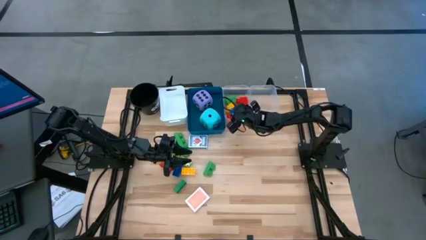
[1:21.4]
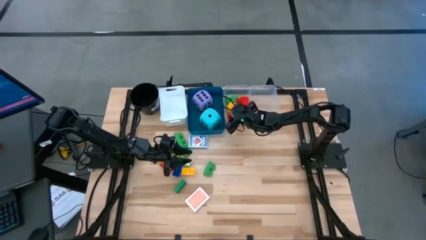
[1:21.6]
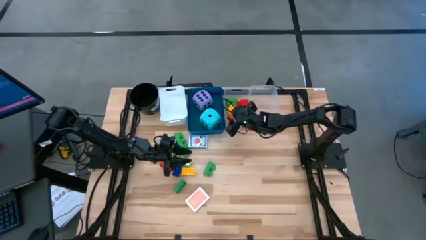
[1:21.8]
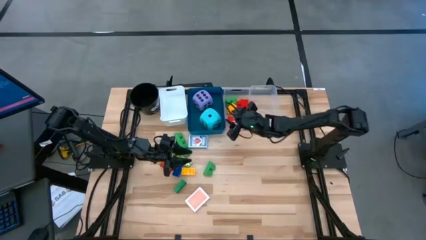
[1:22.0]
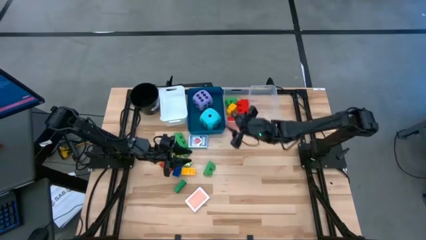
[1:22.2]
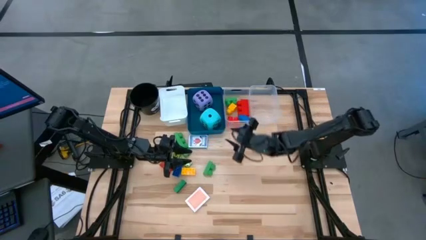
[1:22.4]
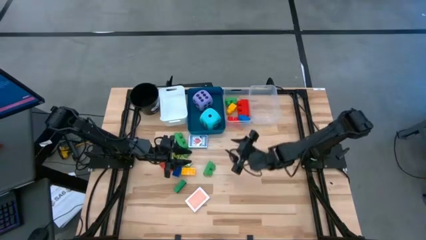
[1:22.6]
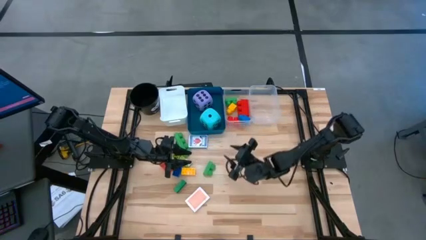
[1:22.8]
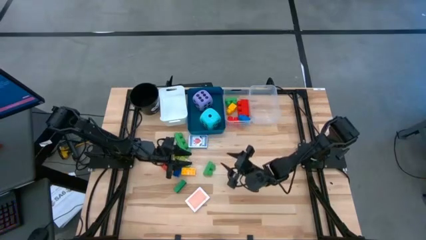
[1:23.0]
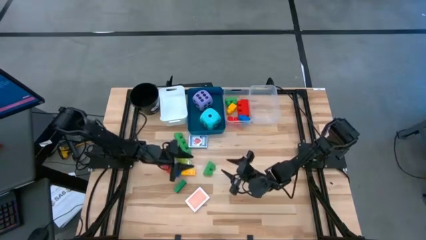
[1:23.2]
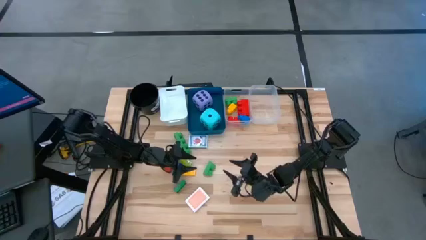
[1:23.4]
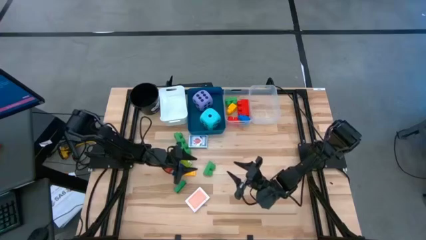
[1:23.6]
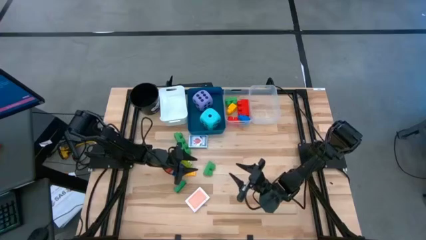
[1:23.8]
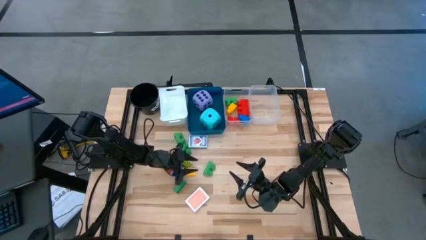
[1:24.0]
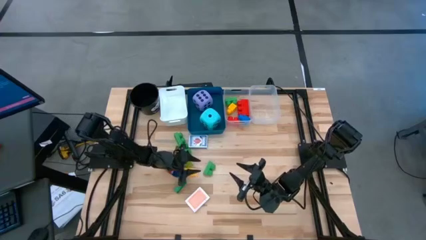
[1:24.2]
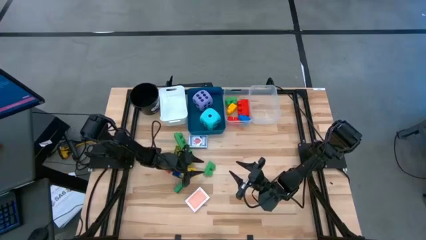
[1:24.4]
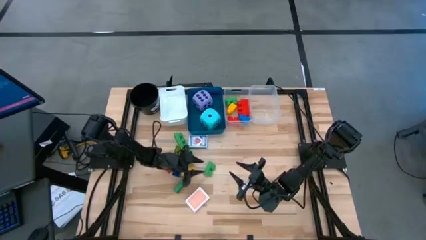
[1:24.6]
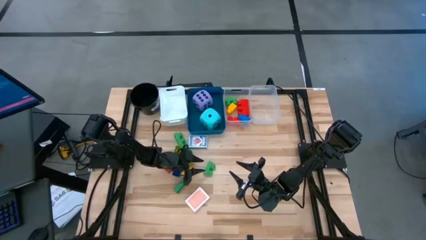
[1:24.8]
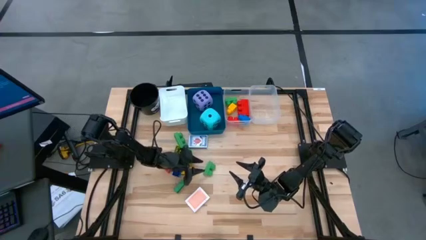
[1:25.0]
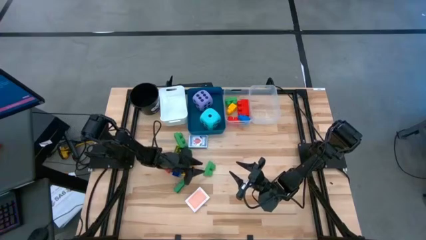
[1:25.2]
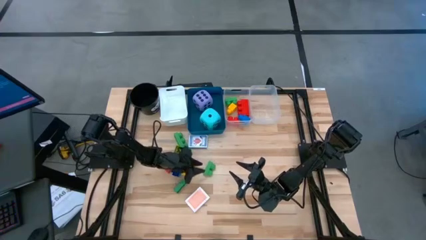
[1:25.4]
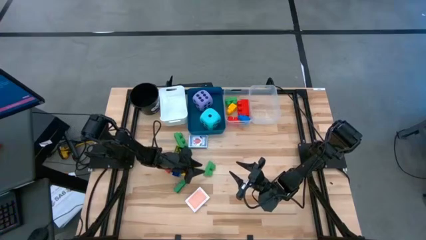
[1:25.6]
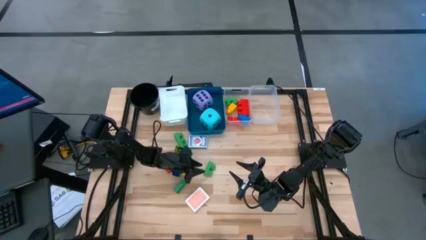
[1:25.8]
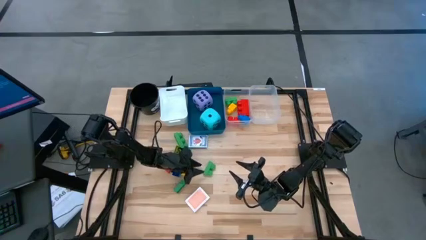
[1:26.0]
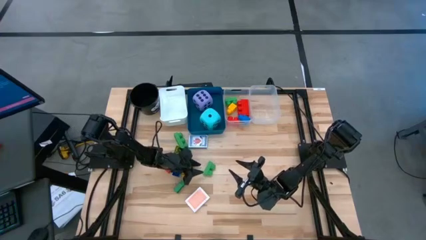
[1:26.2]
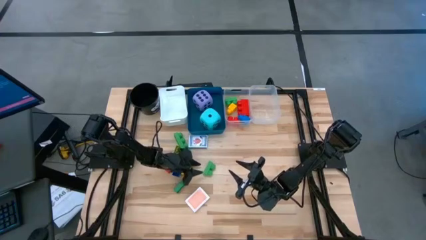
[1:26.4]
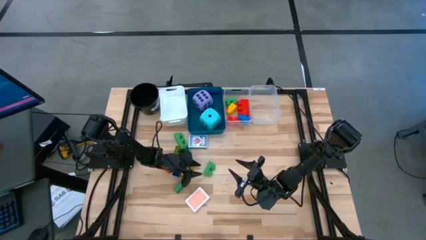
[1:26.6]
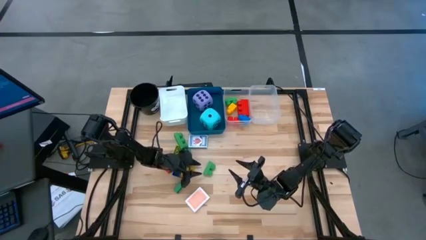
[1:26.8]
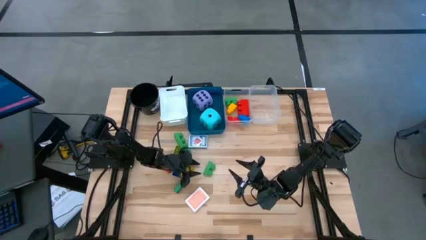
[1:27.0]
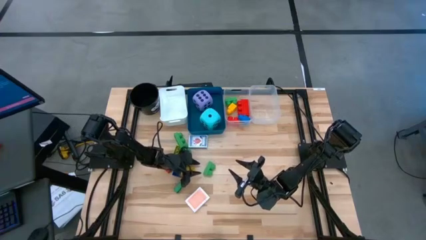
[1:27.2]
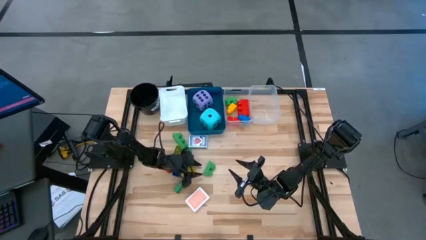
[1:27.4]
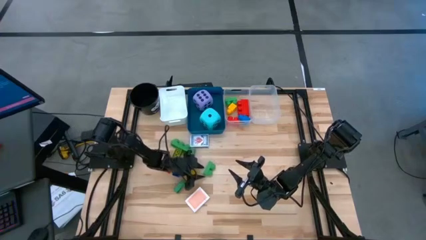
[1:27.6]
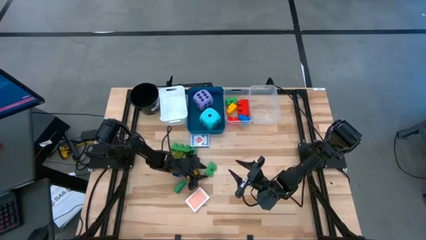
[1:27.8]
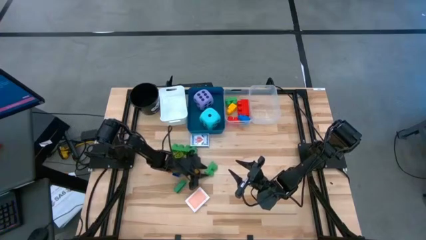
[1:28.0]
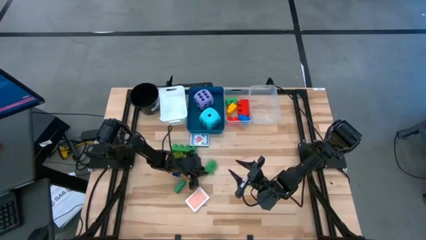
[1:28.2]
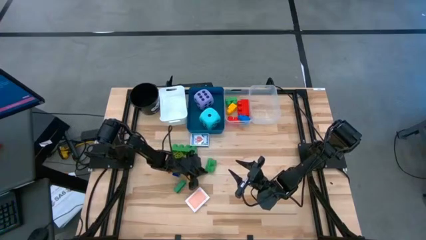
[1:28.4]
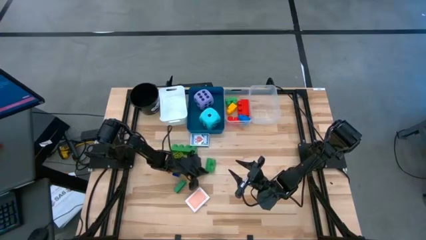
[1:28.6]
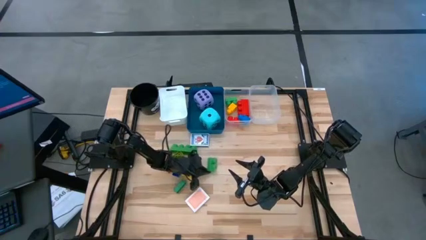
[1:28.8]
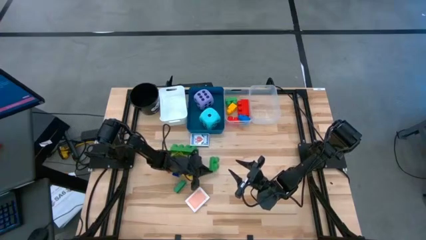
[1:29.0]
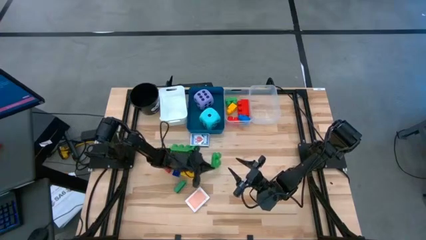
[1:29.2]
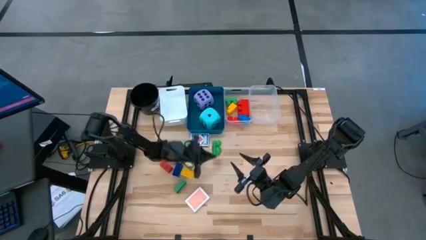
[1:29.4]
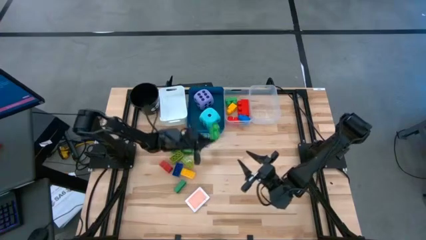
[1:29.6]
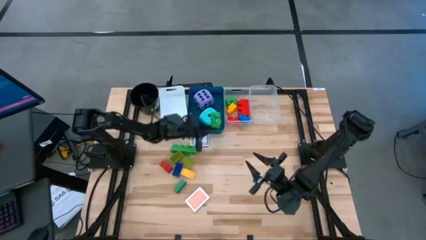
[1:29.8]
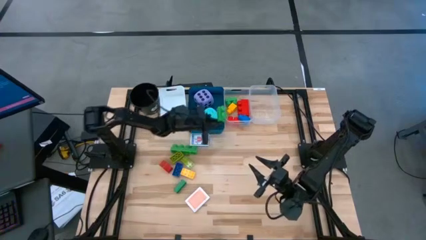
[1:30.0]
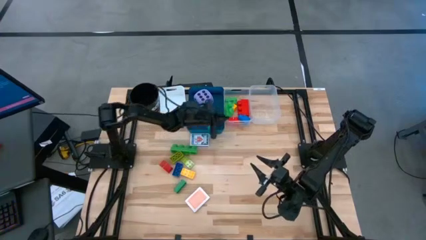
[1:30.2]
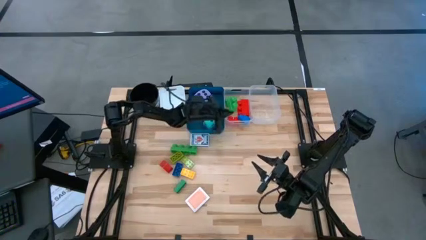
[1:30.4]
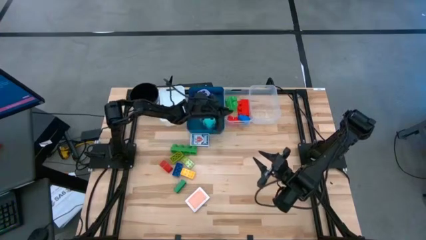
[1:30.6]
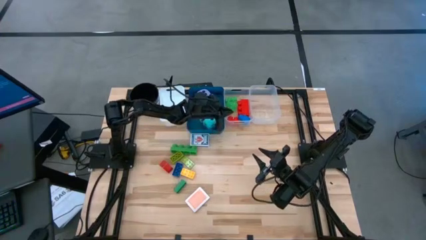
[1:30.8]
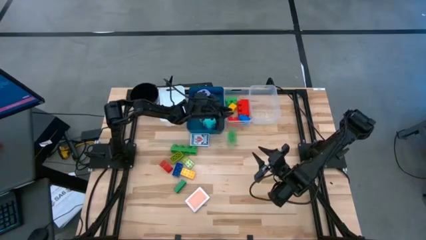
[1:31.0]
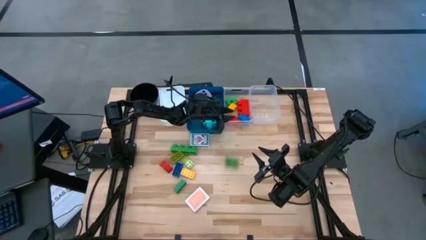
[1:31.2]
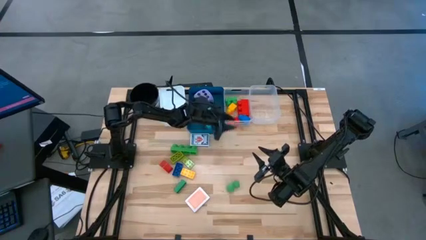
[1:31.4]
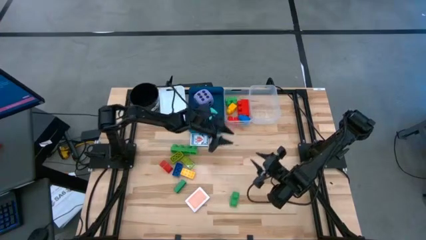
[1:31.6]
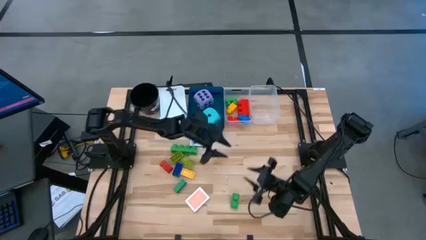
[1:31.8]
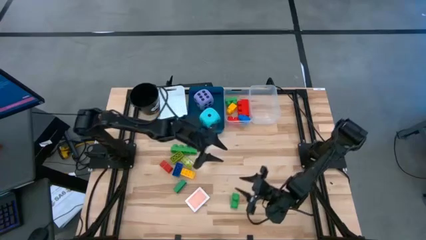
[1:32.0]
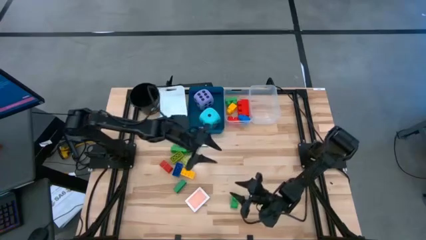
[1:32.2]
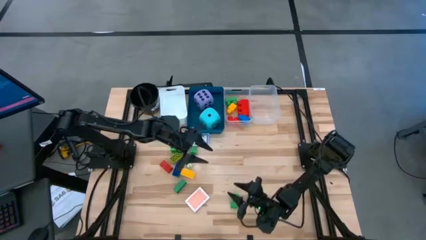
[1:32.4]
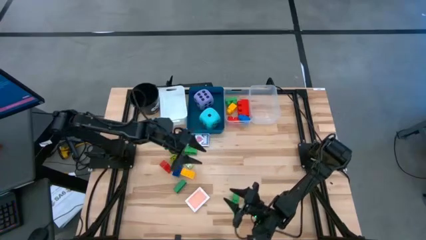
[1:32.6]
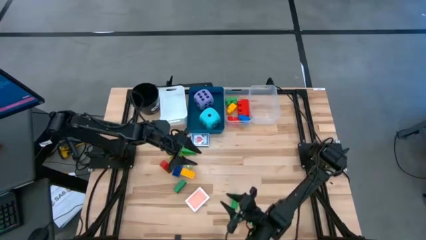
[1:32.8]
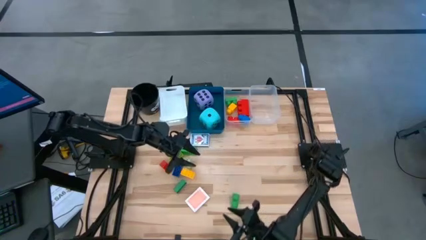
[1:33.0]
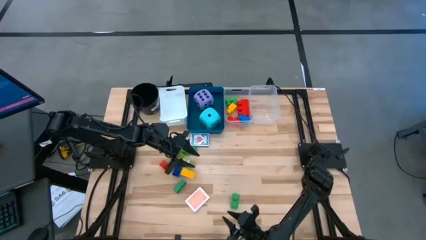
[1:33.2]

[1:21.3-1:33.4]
Task: Pick & Place Toys
Put the green 2 stud game piece into the left transparent bin
